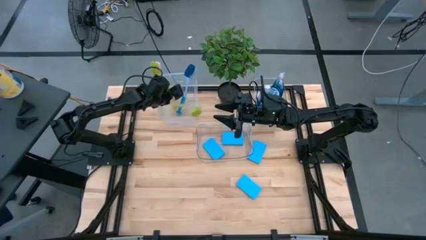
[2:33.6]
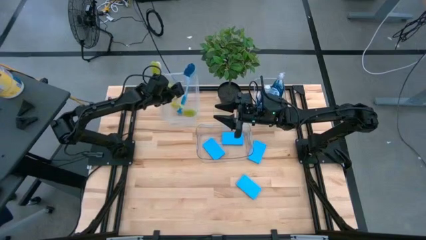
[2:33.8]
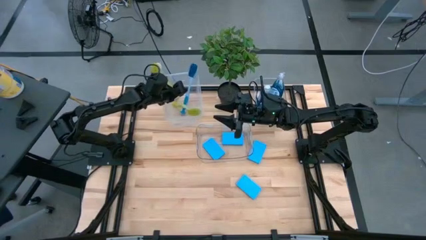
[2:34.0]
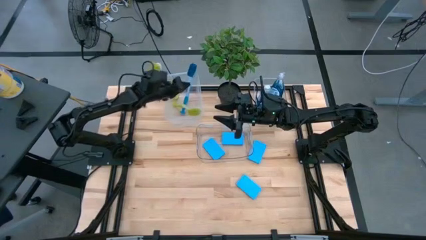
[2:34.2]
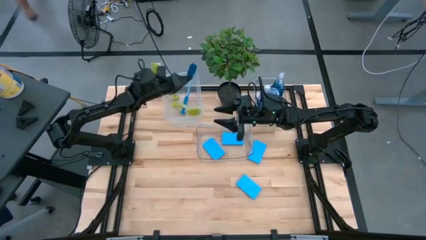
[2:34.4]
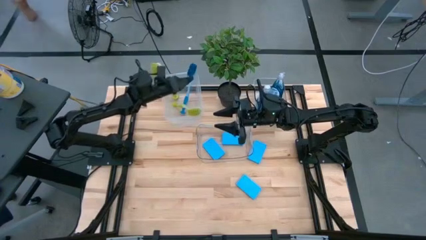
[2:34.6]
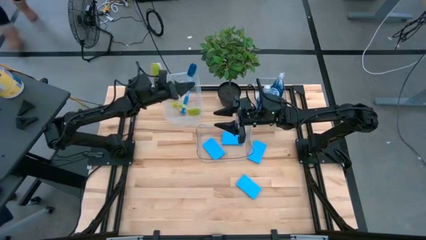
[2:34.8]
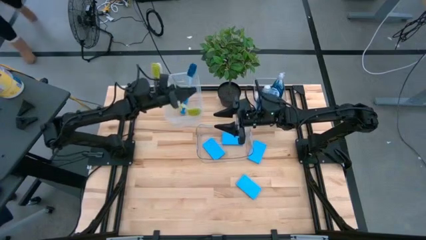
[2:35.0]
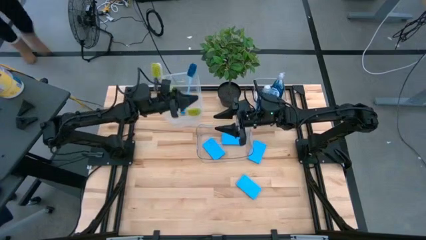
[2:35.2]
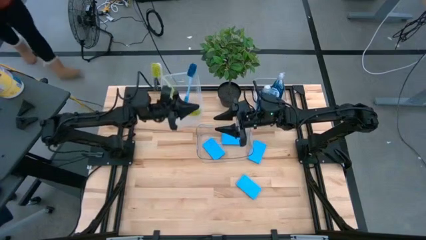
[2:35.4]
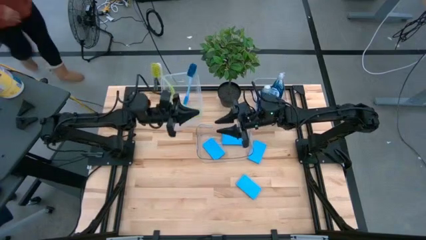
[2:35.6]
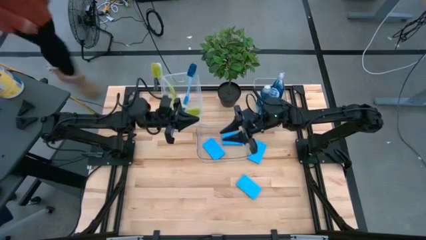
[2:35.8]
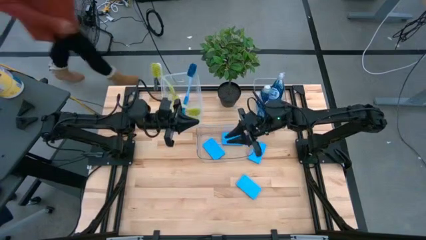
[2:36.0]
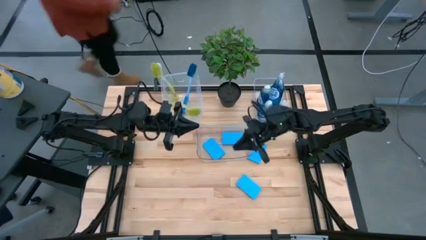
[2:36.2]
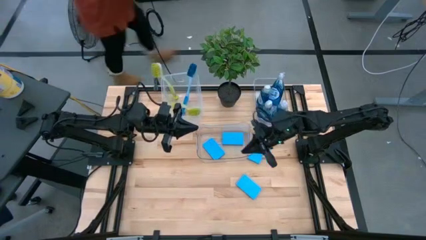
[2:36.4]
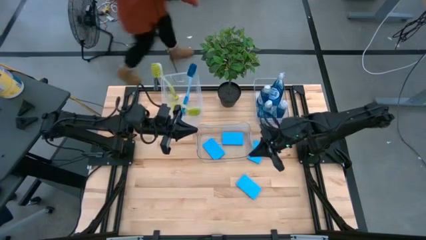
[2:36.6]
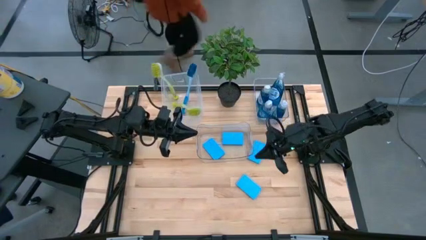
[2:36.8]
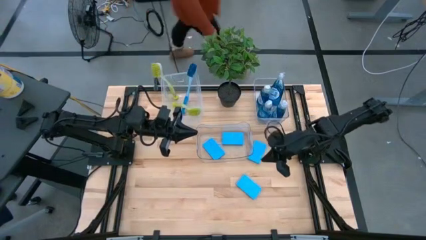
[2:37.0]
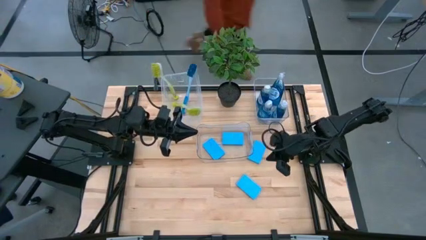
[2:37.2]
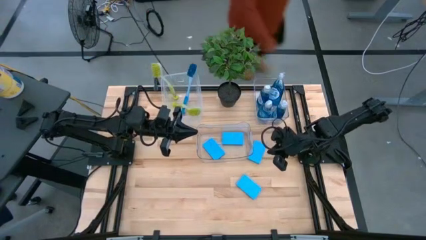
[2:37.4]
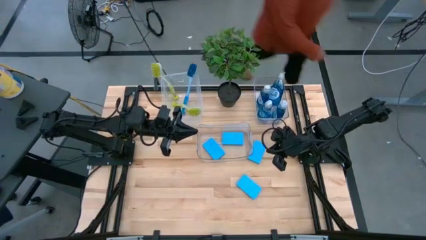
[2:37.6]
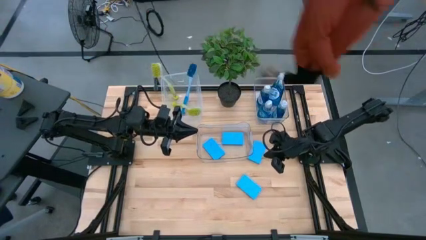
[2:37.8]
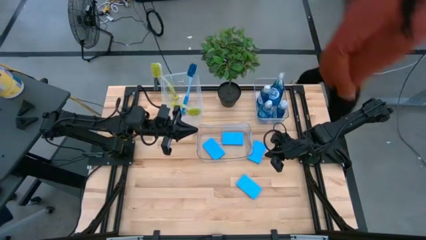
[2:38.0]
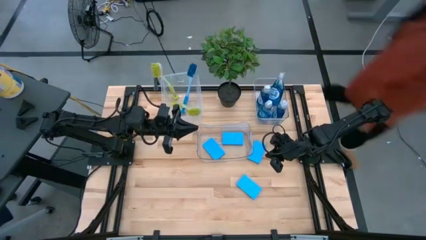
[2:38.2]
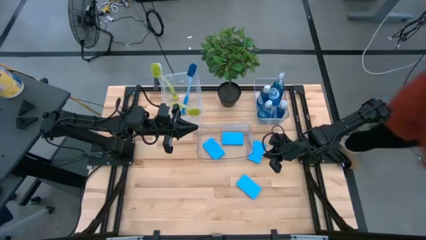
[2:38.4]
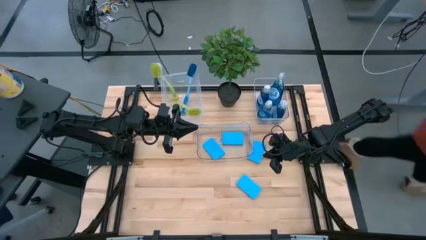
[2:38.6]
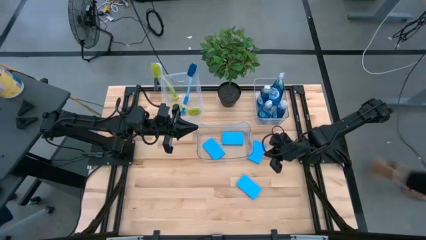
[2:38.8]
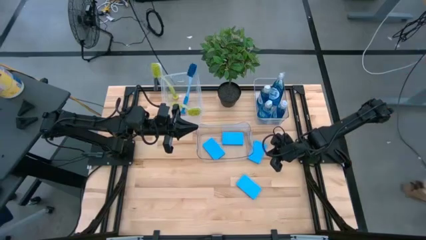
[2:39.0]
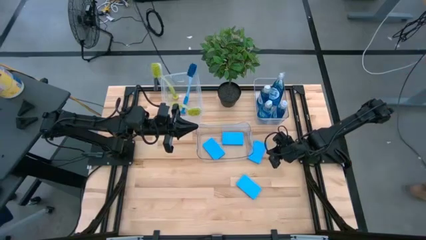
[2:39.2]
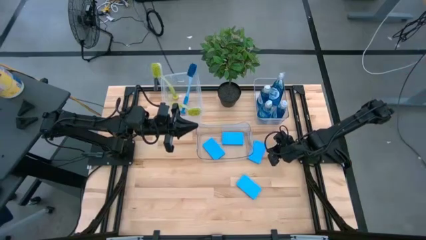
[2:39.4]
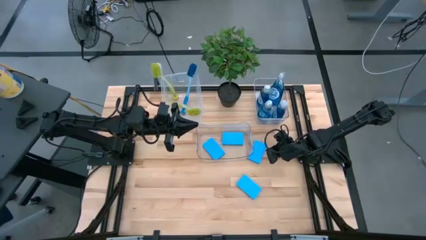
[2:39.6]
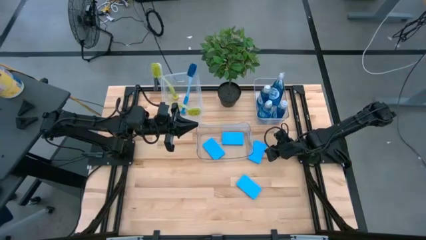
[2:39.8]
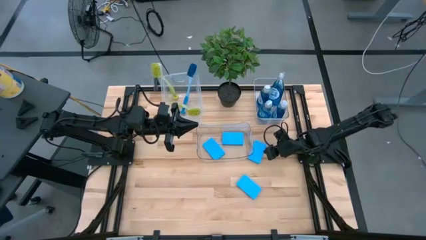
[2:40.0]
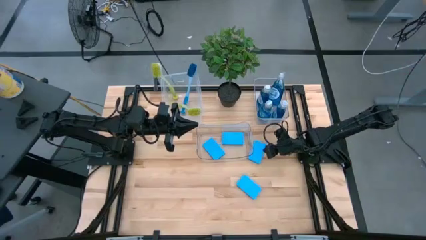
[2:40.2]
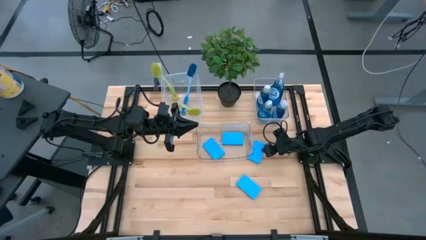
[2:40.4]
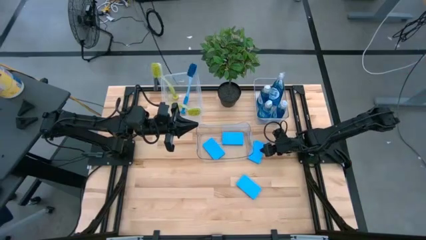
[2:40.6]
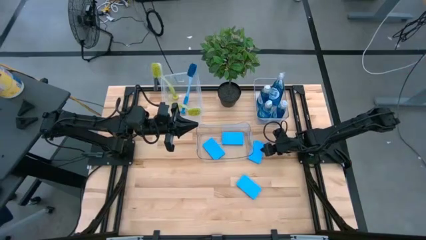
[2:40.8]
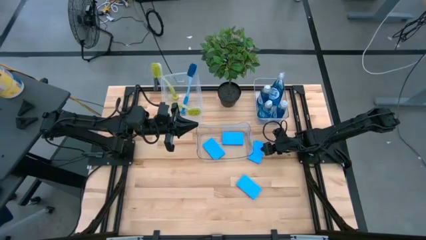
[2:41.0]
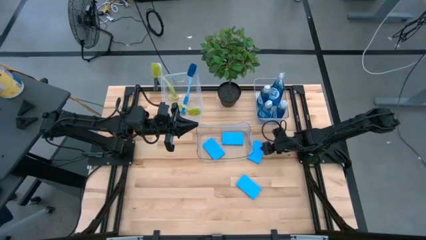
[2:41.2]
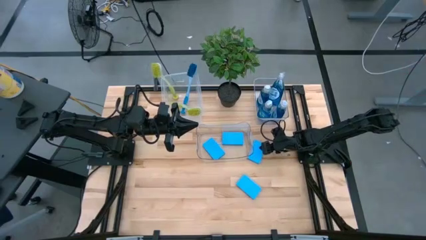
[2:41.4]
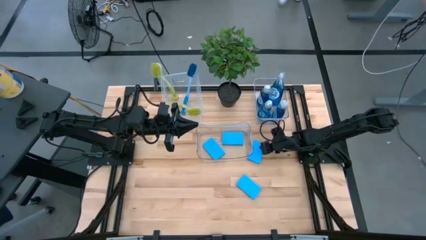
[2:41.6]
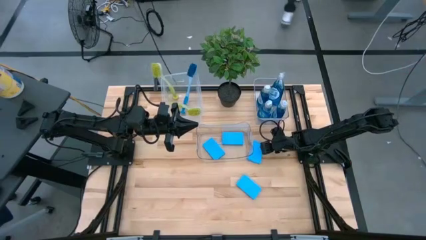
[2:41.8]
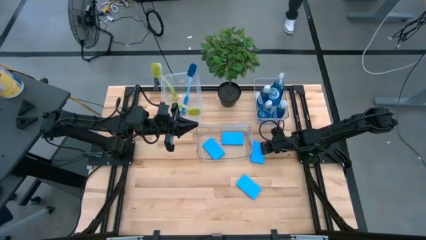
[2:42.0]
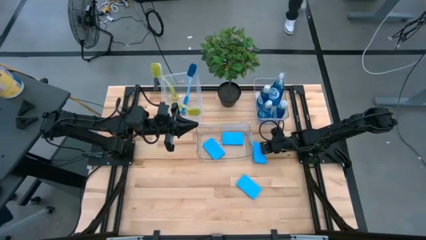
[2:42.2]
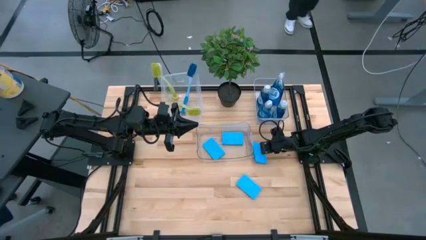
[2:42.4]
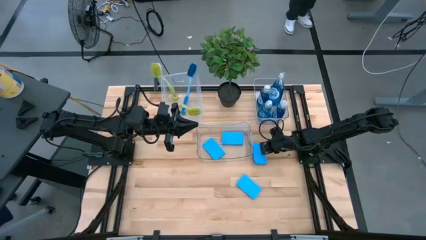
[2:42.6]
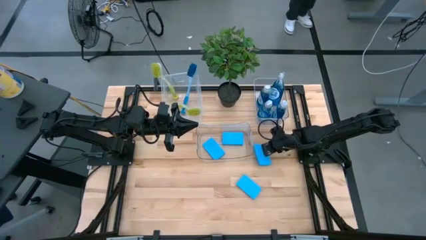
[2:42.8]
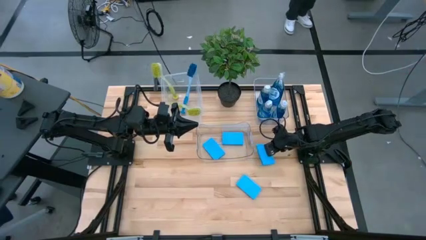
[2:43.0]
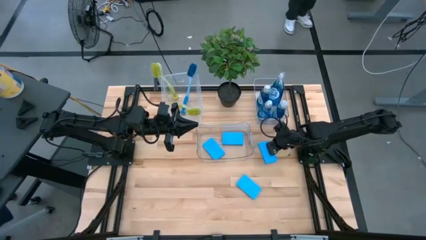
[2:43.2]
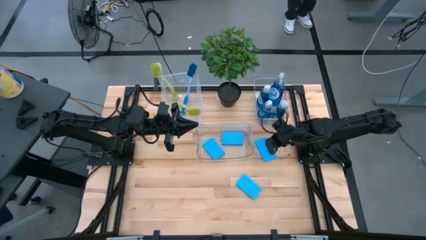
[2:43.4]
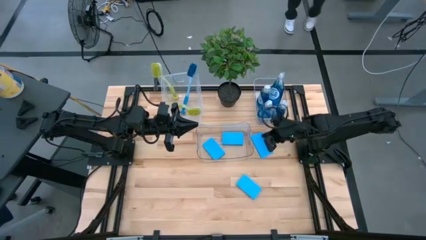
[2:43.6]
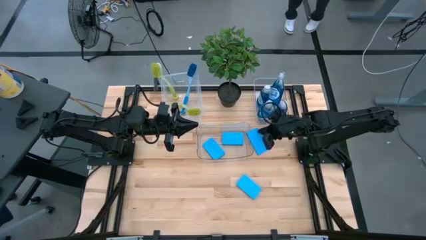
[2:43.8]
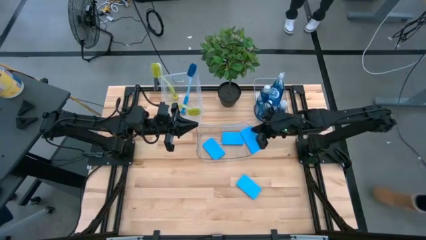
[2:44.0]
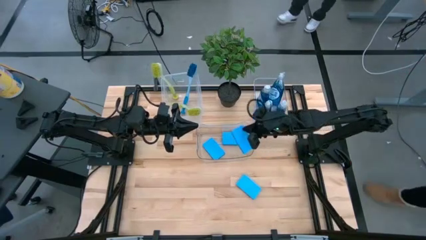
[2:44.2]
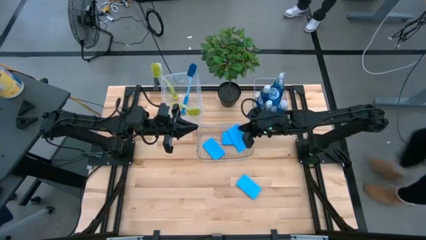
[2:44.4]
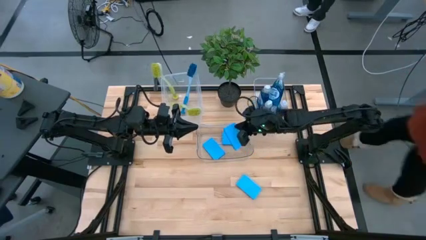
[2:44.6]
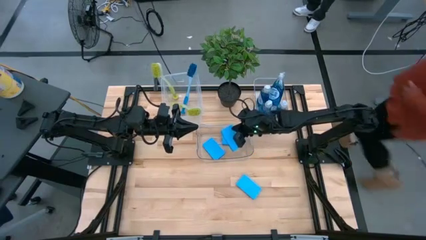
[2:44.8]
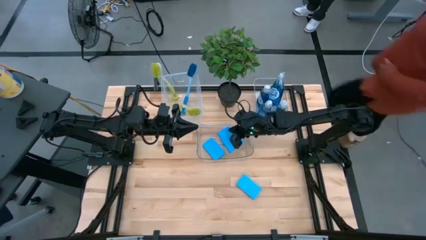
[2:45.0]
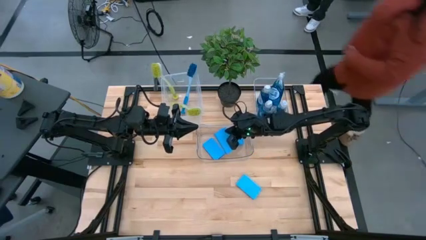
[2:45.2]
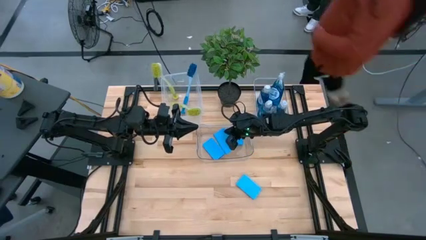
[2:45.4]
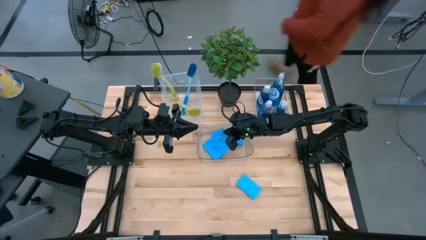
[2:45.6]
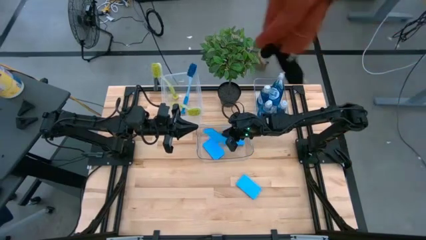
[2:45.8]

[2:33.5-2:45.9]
Task: Pick & Place Kitchen Sink Supplies
Put the blue sponge into the bottom transparent bin

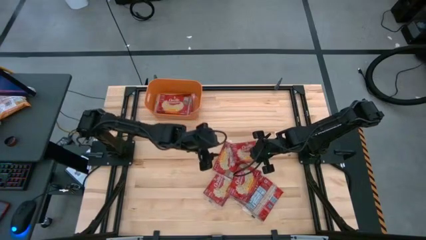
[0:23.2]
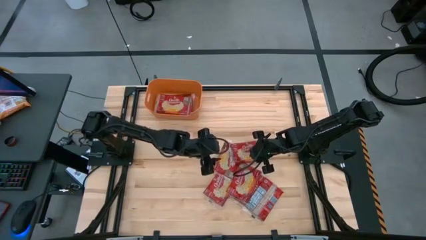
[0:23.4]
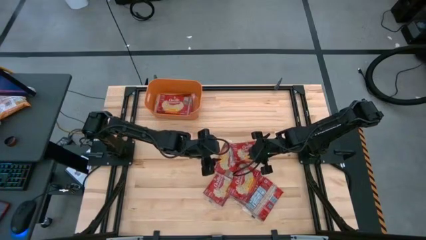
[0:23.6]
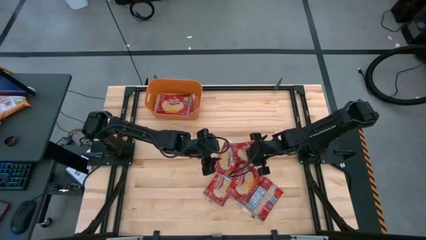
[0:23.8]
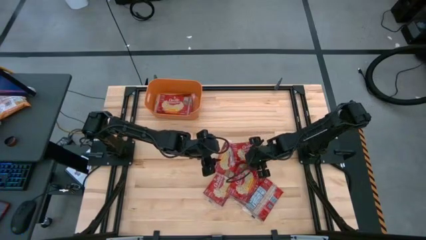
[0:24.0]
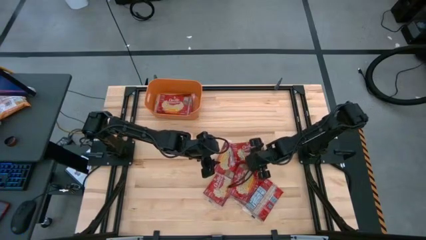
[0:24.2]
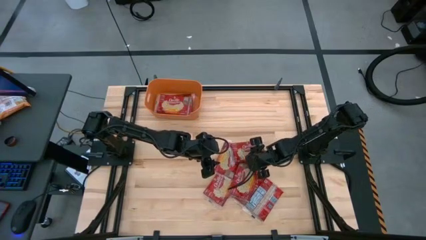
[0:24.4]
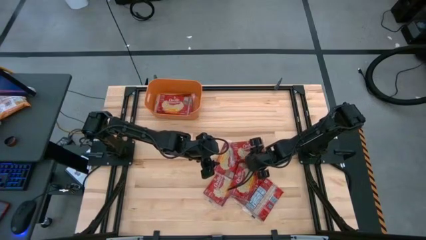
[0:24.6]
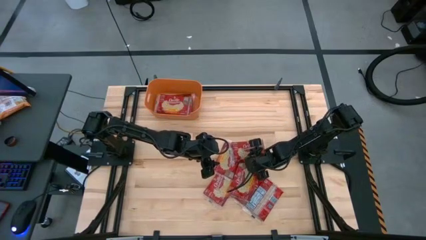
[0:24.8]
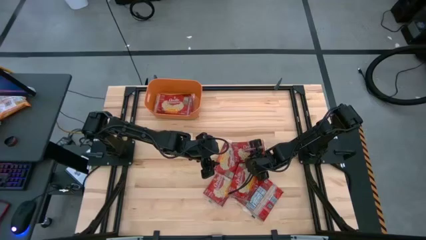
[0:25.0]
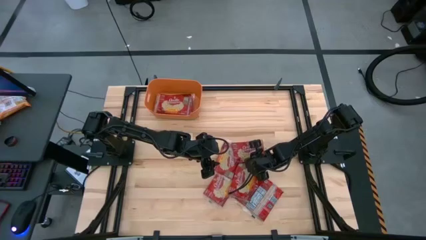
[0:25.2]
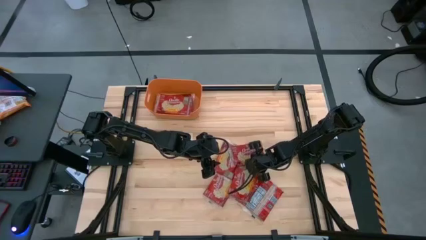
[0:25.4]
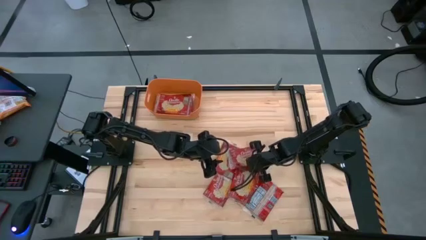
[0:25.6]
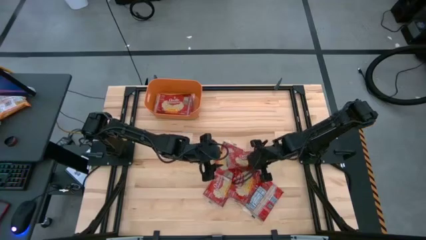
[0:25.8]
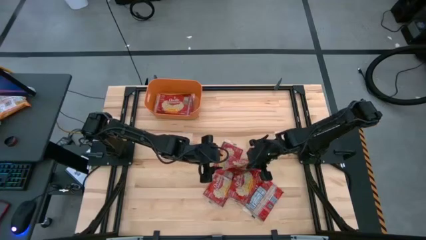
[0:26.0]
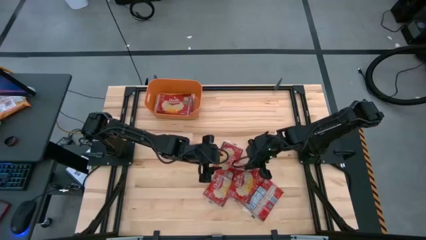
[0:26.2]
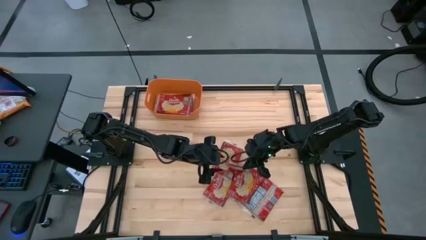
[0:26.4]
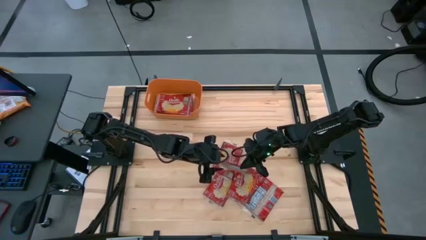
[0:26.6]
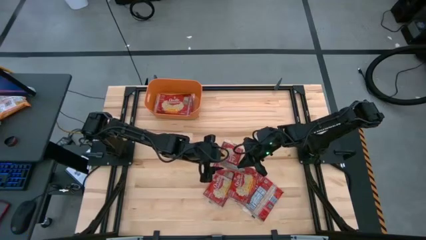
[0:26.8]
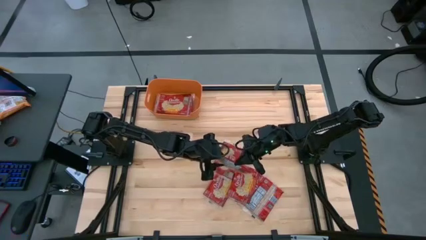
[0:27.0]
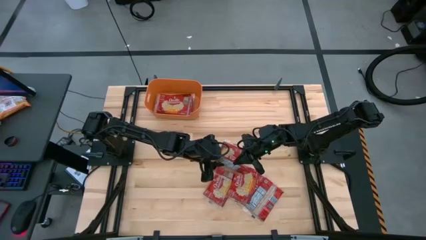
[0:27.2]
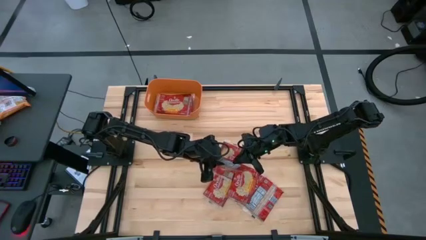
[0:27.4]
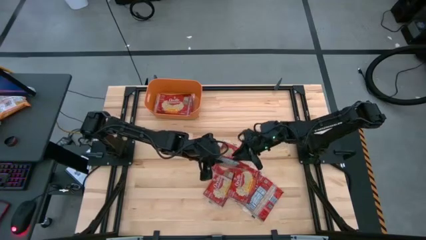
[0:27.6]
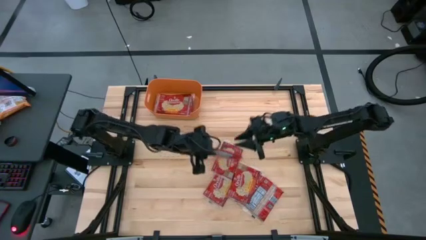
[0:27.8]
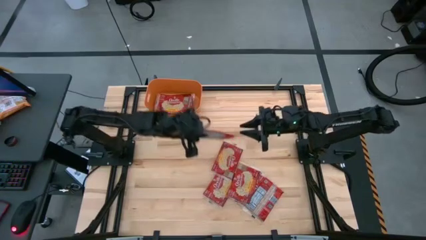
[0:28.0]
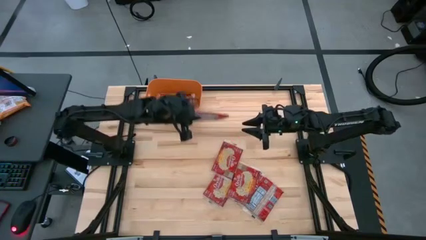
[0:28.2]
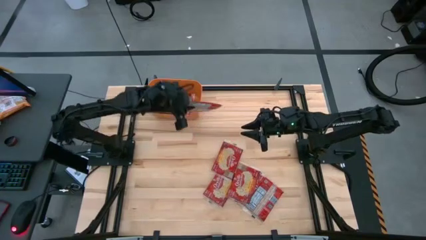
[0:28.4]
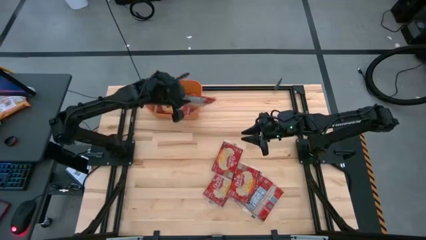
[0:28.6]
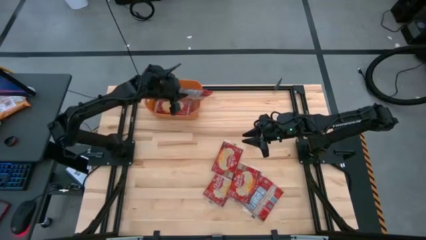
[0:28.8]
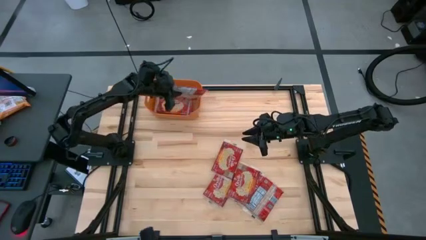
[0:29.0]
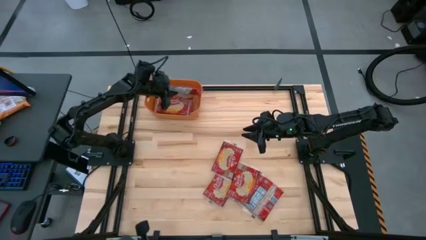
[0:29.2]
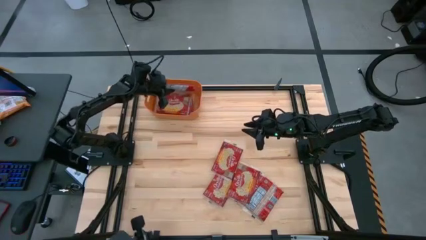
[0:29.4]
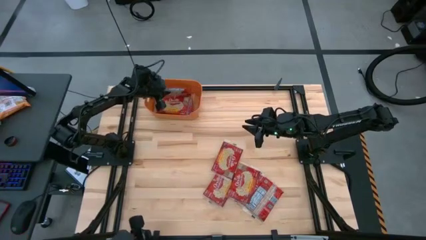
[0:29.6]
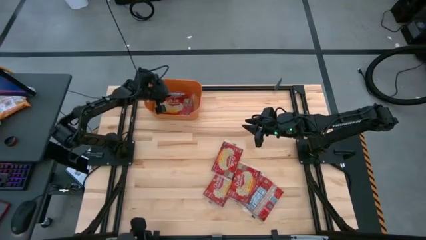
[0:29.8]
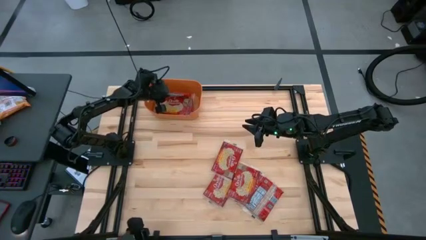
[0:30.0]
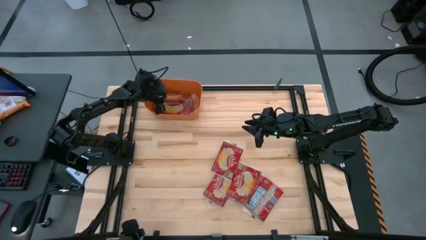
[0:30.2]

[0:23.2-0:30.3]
Task: Sort popcorn bags into baskets
Put the red popcorn bag into the orange bin
